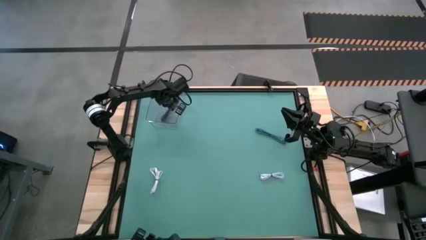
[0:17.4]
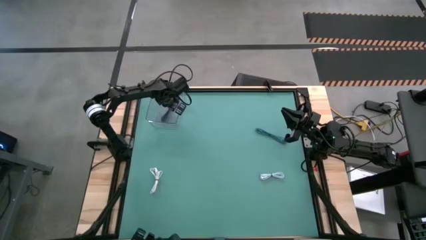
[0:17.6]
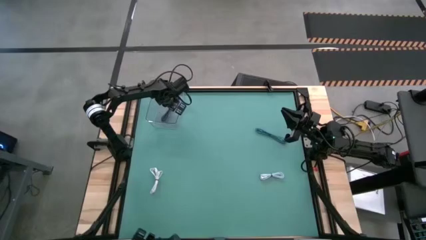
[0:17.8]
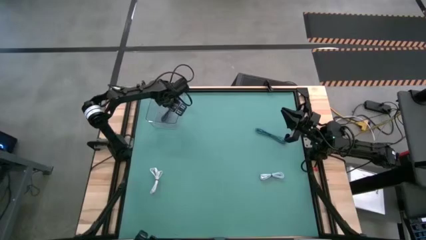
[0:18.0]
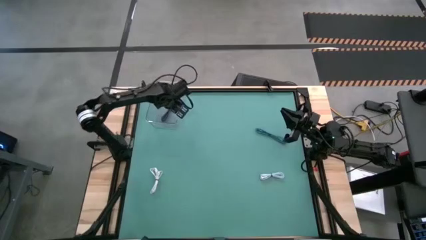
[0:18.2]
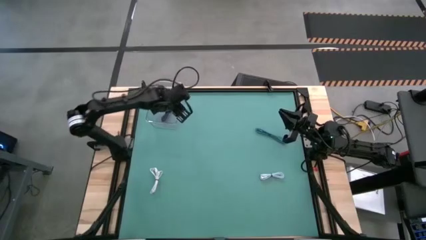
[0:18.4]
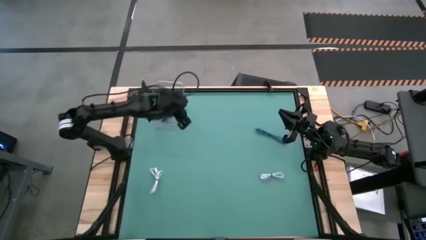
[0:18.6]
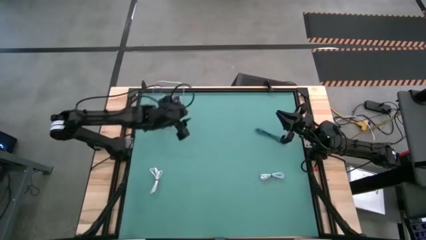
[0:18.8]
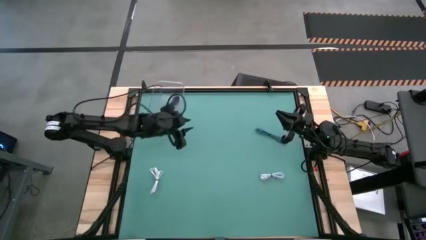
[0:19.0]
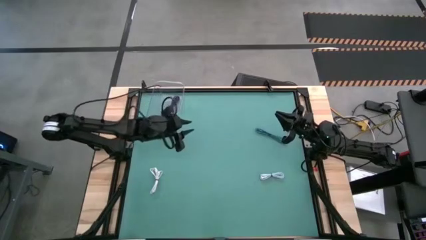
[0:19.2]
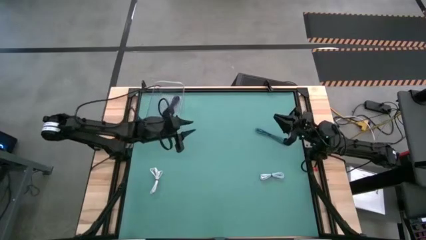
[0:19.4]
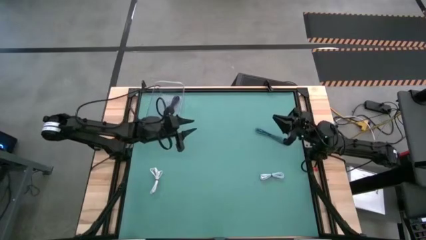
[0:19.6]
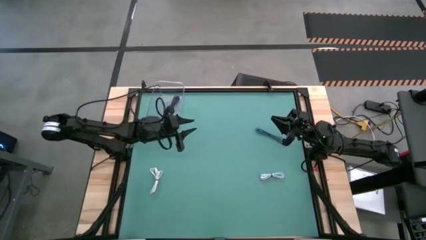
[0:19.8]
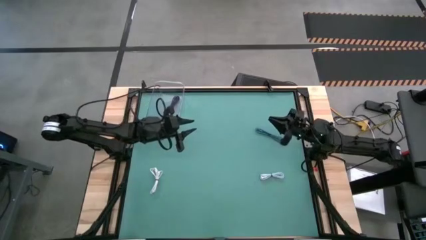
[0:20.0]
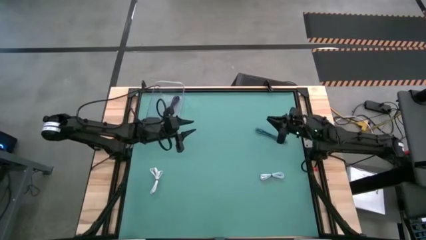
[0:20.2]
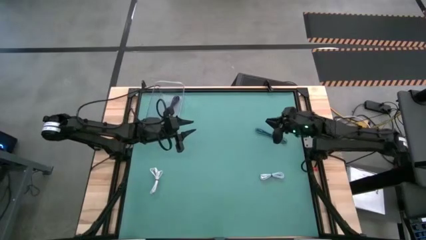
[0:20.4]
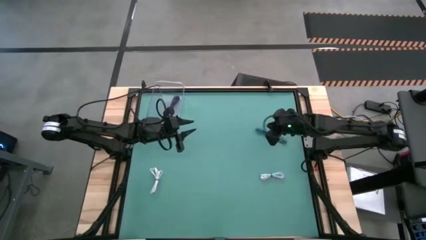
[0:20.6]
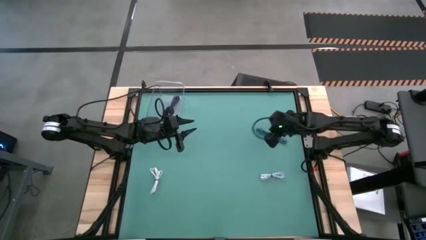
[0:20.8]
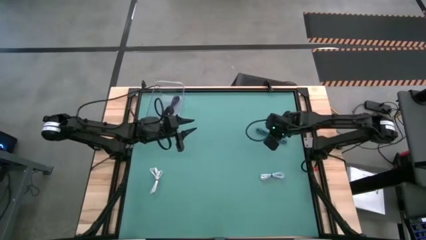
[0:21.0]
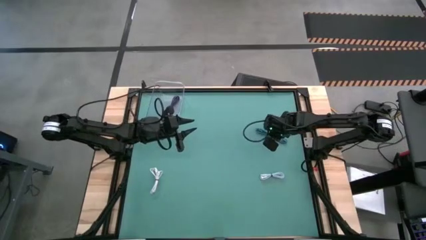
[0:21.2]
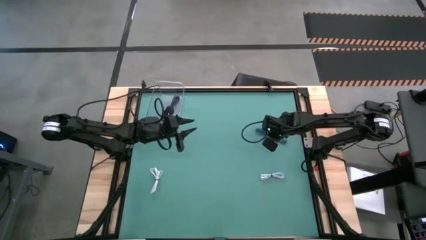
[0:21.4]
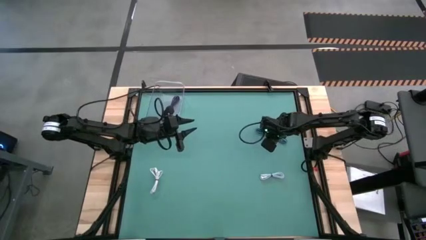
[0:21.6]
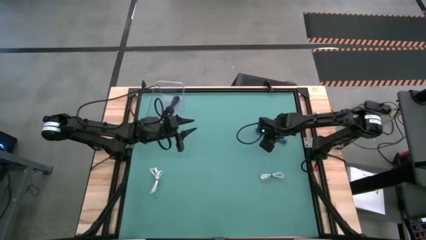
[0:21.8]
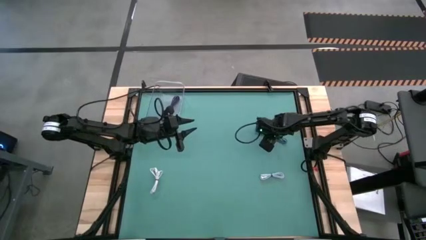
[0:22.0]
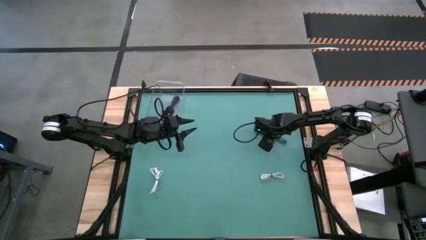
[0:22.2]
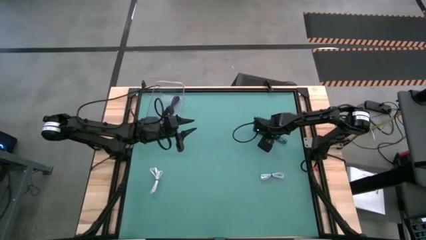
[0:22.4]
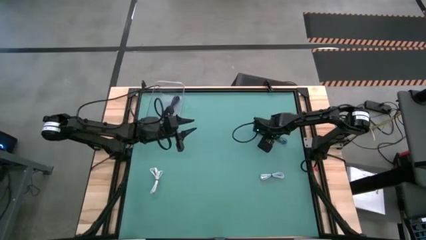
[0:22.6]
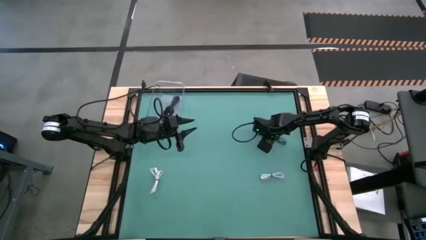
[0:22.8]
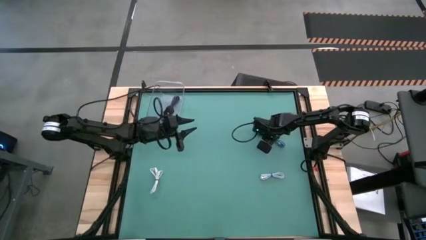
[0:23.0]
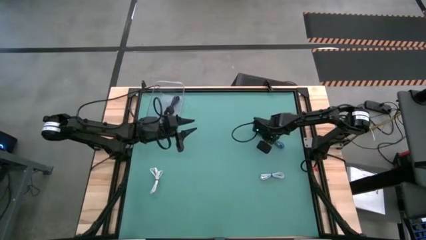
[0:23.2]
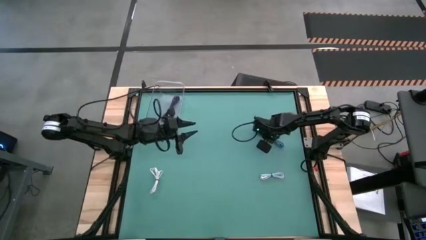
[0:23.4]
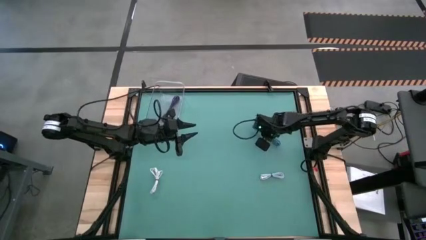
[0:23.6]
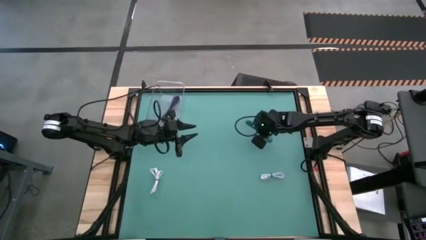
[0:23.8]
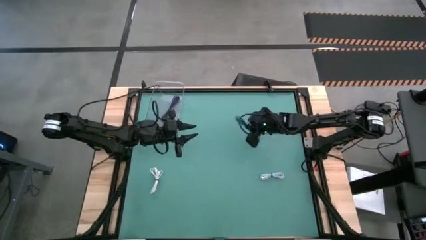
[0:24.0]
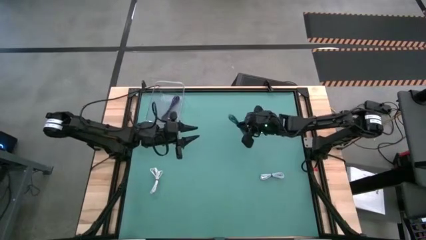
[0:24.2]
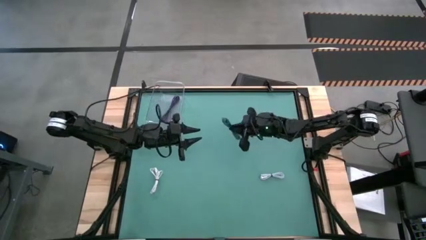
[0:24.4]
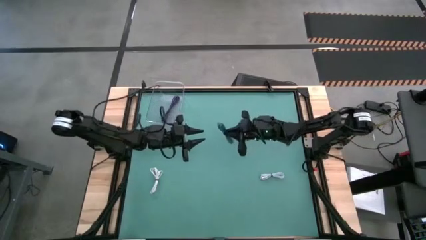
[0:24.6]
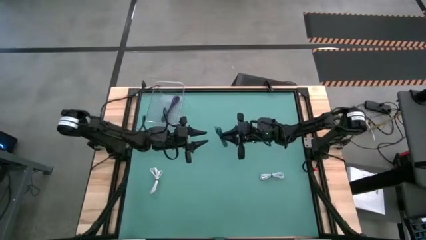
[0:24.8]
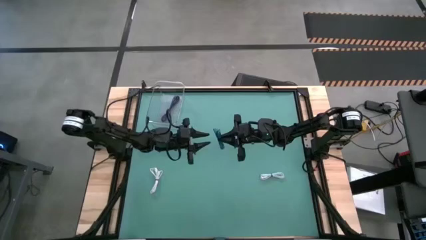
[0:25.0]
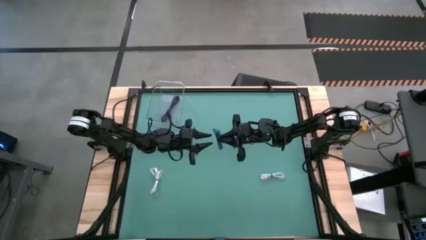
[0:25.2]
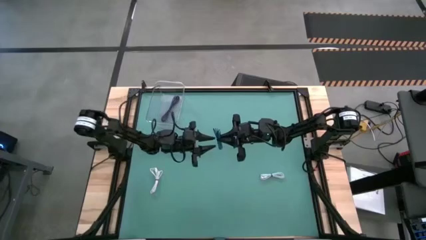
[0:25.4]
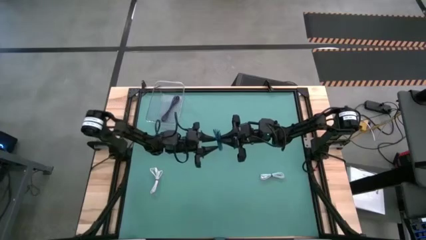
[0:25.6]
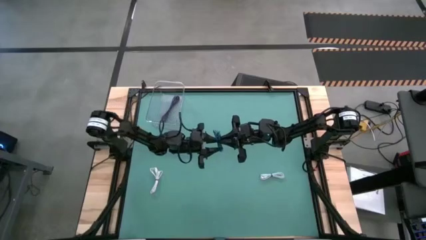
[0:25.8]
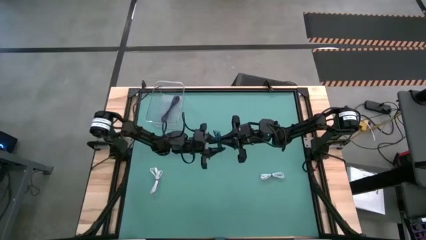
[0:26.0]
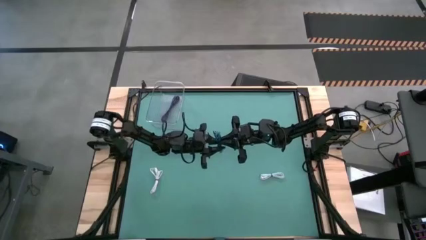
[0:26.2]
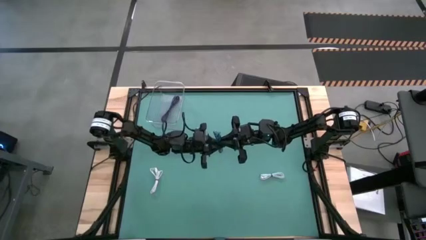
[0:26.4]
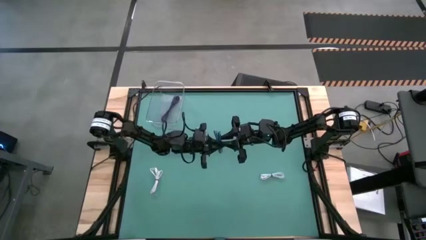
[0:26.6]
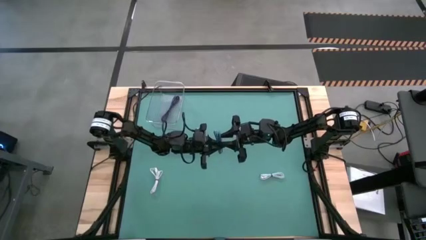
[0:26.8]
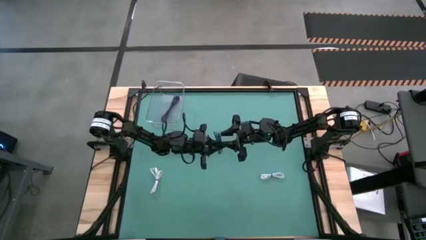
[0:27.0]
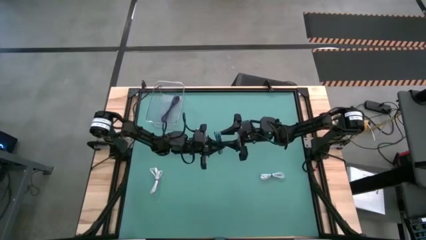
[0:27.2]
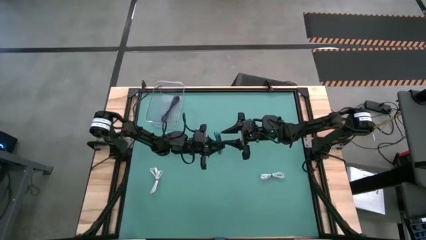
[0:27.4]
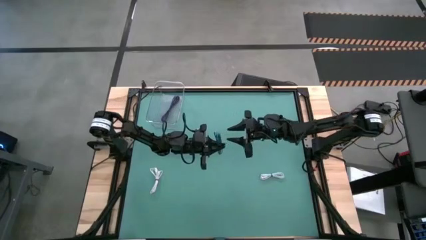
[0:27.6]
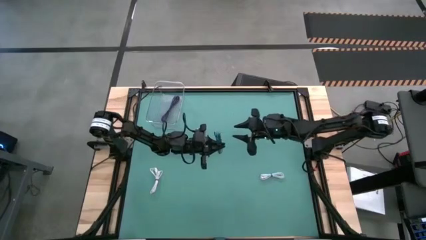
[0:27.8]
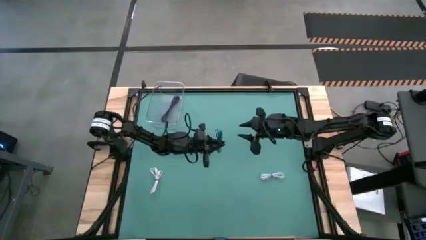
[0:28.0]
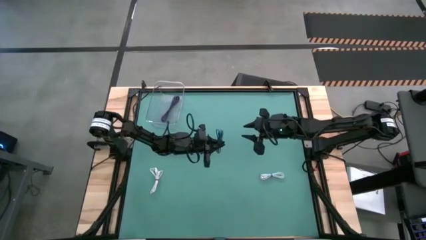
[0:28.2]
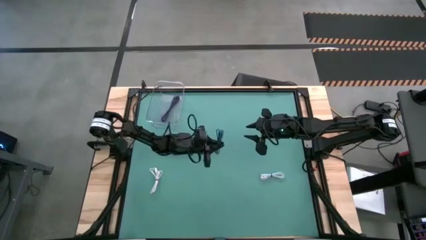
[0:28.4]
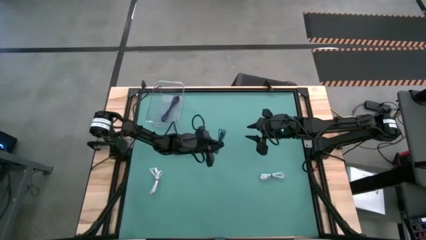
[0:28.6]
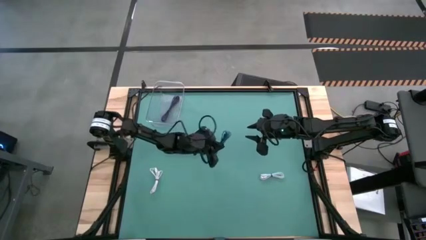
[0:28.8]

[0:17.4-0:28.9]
Task: Pick and place USB-C Cables
Put the blue charger cable into the transparent bin
